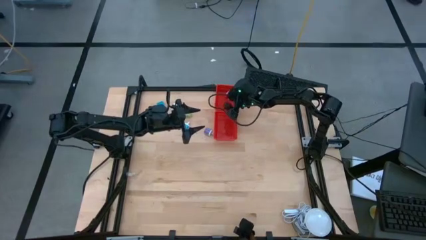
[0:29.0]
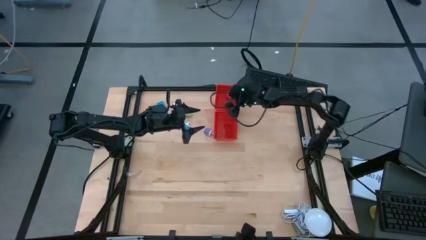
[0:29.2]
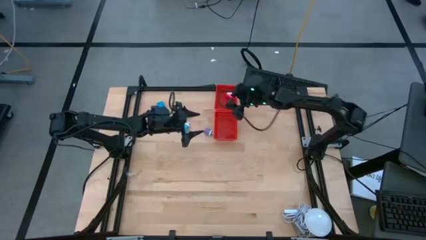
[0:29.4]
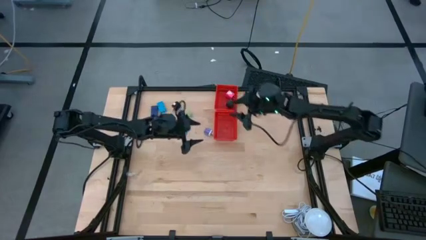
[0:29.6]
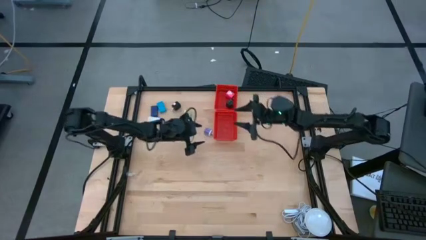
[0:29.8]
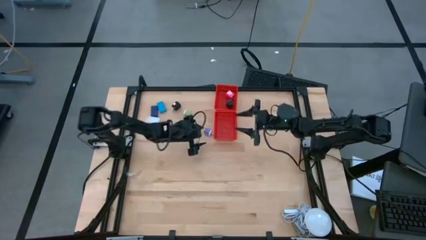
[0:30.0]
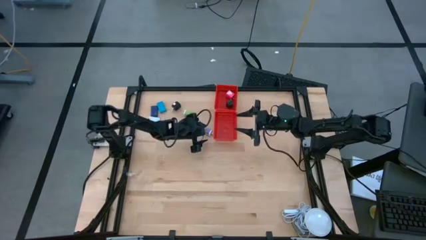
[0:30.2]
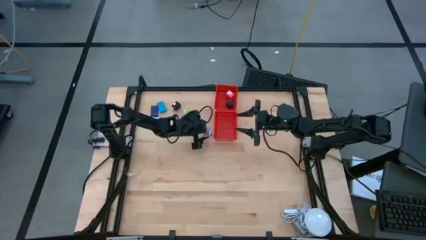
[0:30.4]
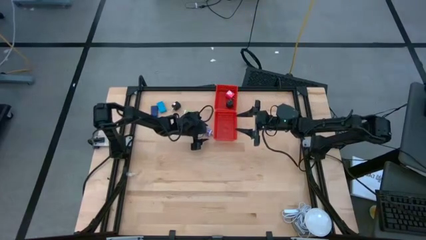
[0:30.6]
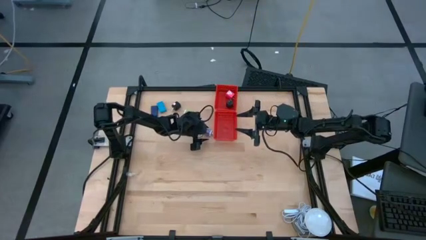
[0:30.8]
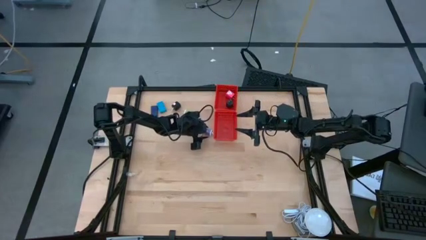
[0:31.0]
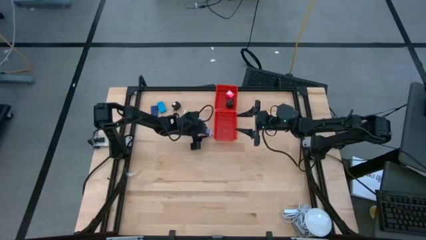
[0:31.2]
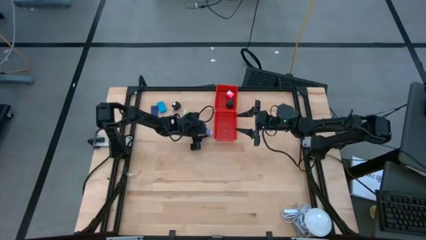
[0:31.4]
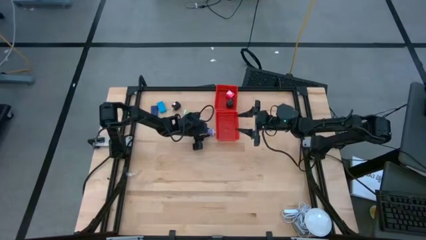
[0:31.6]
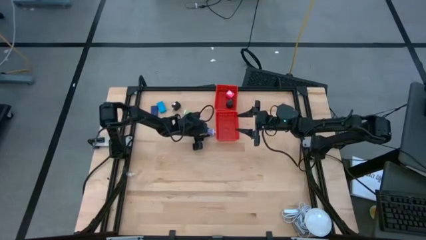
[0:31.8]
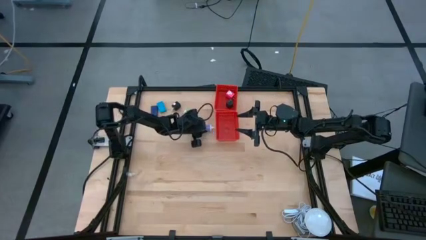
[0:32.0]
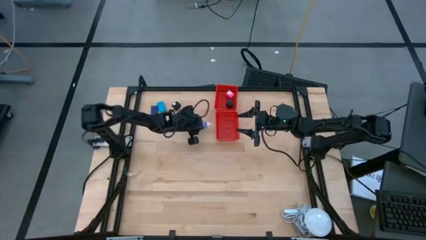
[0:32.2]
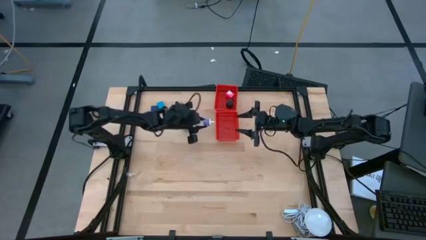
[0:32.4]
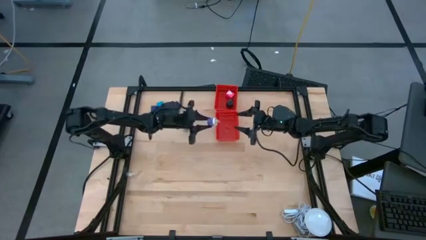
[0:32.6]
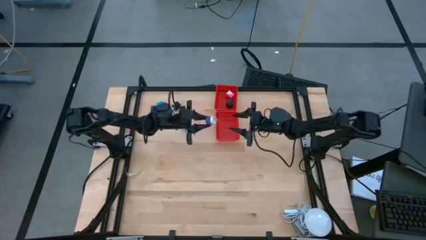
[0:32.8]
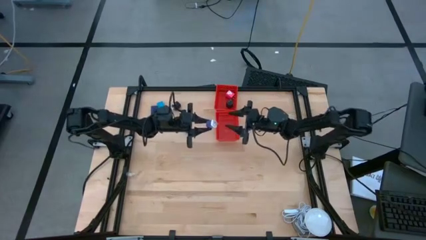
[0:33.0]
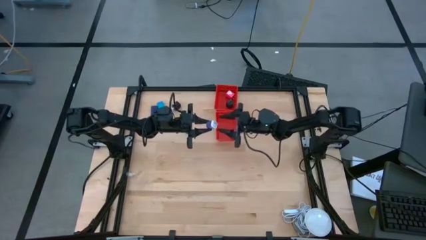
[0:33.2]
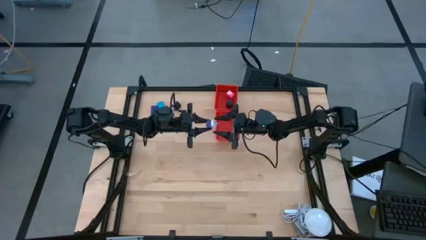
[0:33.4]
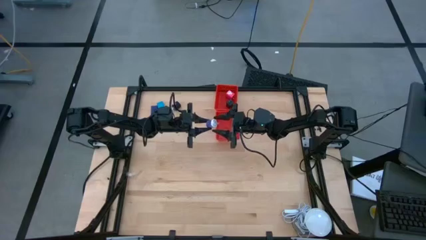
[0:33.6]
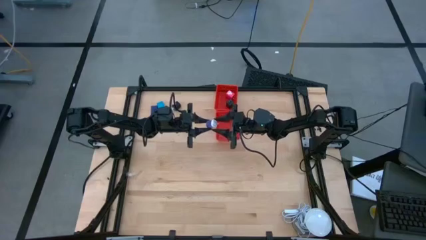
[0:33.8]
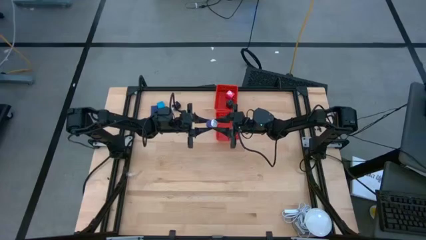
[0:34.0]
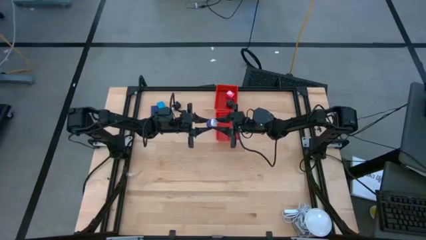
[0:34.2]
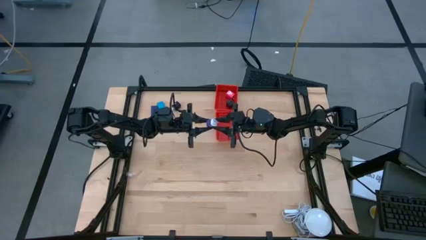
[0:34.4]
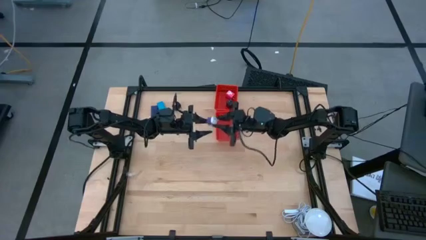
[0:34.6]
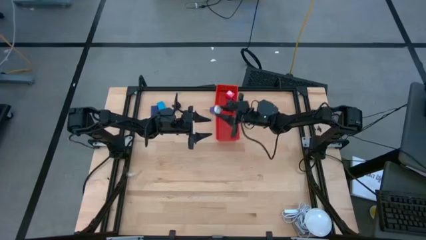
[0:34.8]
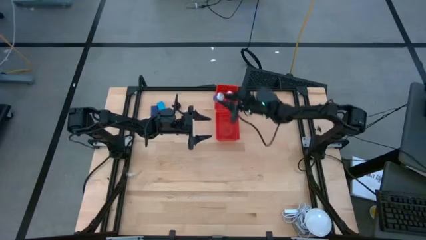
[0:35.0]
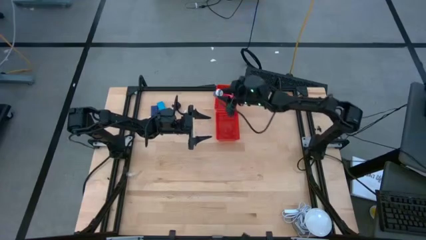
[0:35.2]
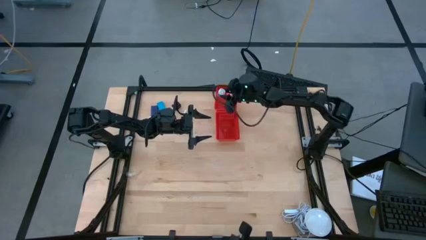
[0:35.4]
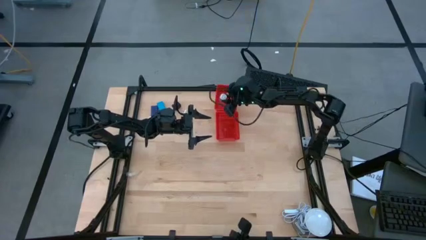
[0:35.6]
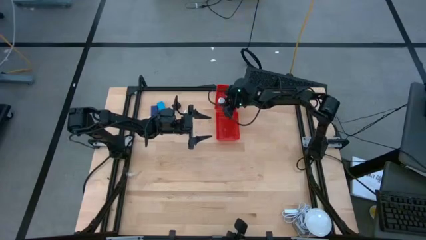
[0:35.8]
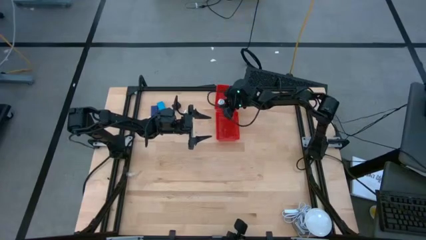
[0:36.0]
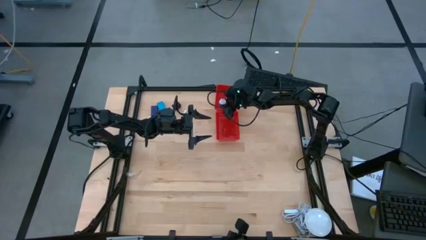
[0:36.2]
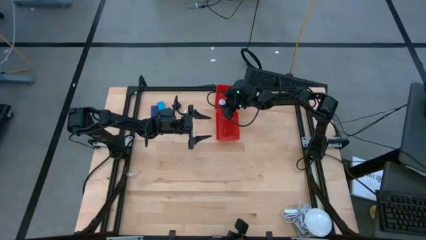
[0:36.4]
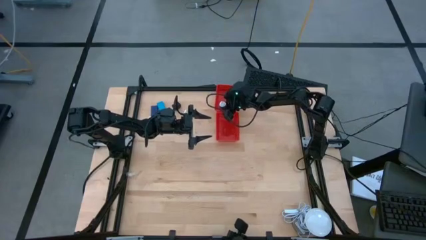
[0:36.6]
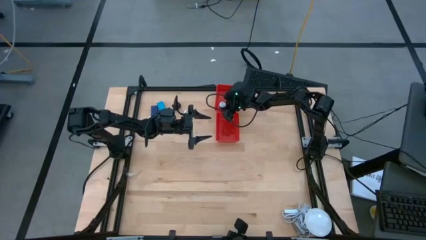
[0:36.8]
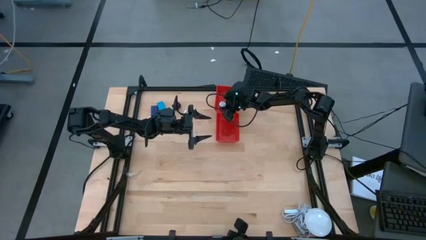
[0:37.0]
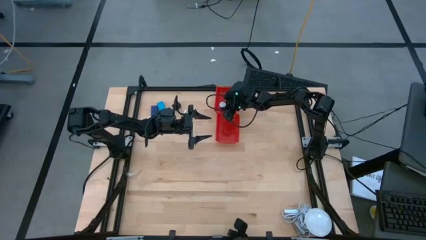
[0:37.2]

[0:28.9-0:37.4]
Task: Pick & Place Office items
Put the violet charger adapter into the top red basket

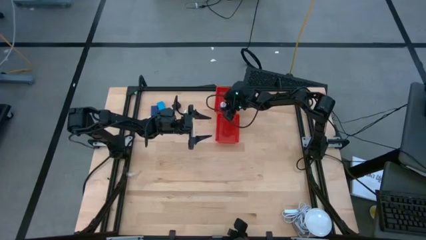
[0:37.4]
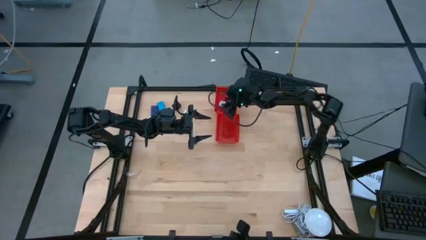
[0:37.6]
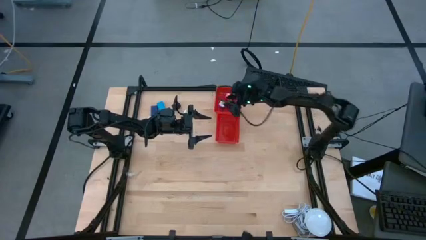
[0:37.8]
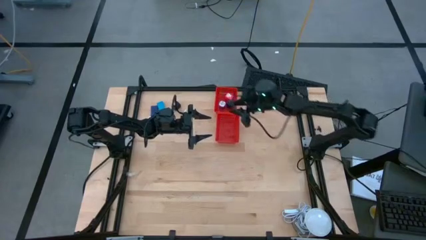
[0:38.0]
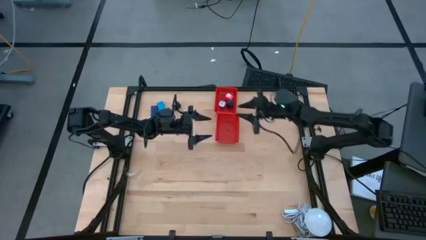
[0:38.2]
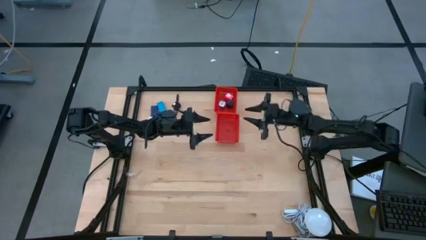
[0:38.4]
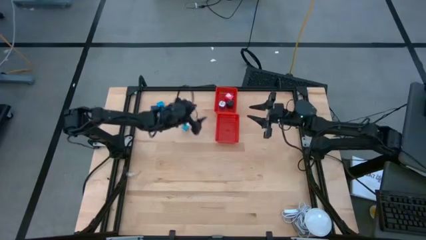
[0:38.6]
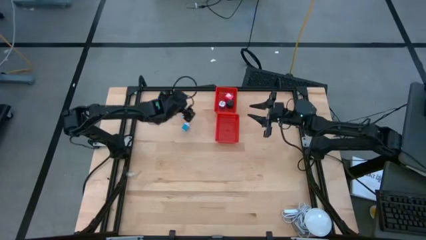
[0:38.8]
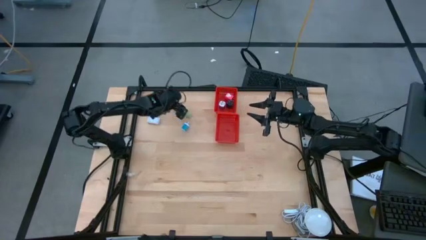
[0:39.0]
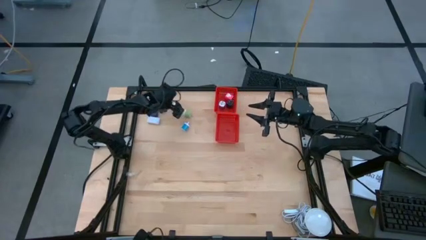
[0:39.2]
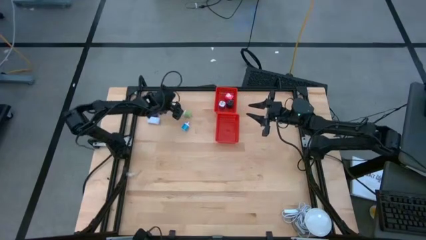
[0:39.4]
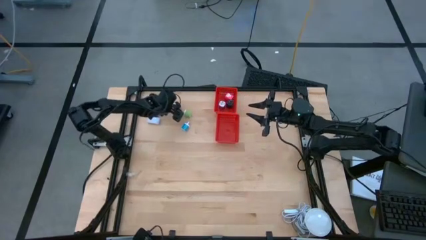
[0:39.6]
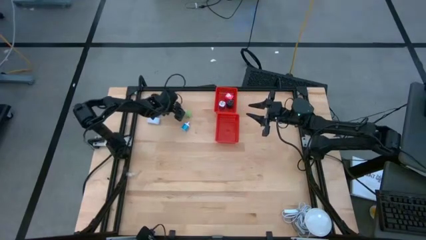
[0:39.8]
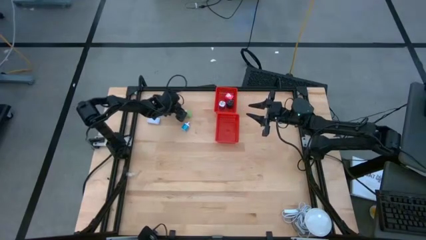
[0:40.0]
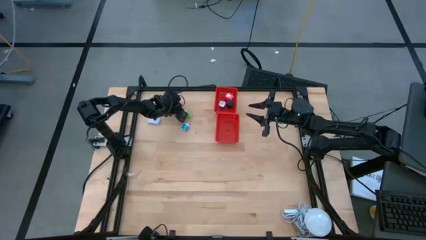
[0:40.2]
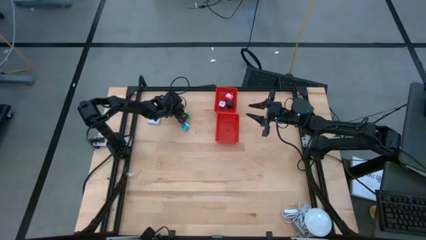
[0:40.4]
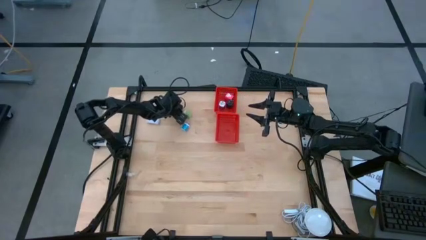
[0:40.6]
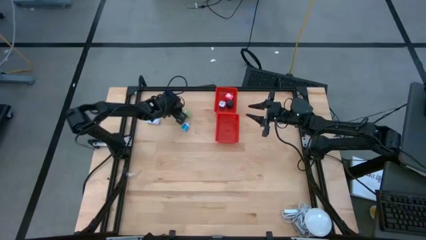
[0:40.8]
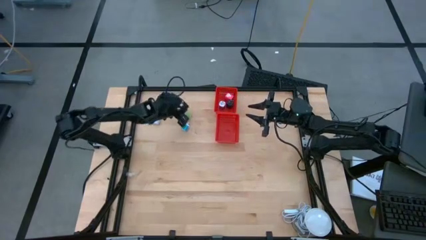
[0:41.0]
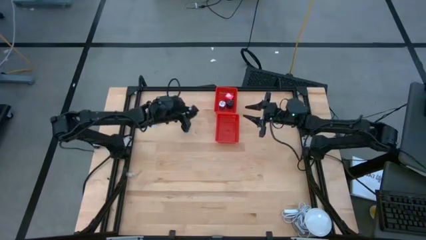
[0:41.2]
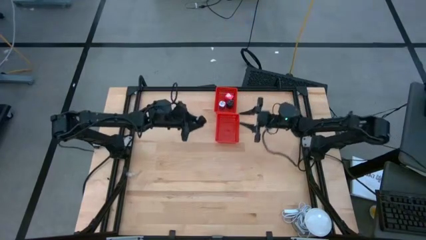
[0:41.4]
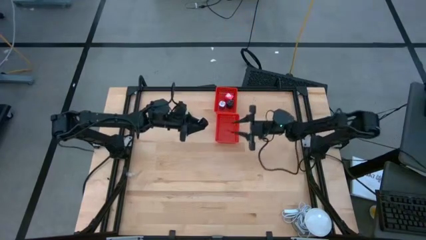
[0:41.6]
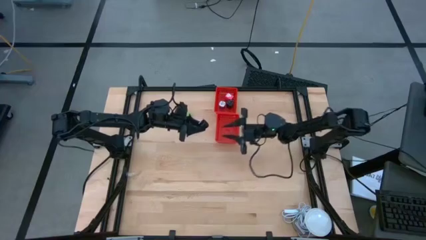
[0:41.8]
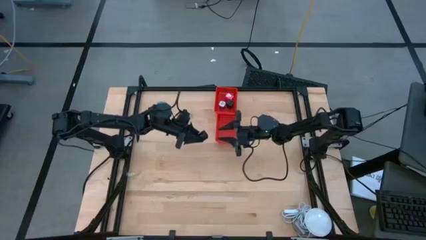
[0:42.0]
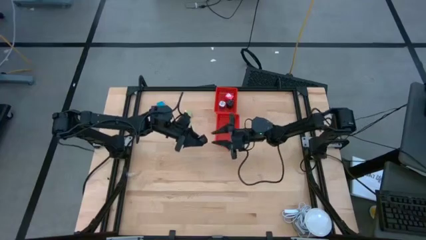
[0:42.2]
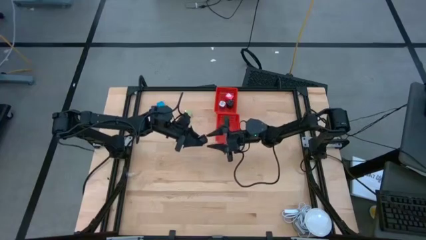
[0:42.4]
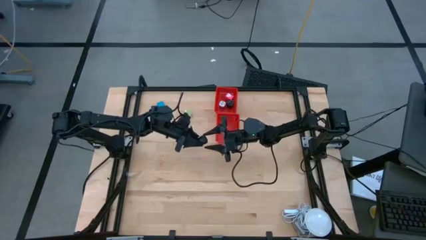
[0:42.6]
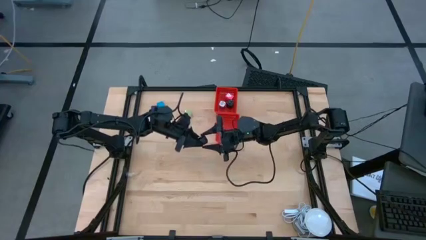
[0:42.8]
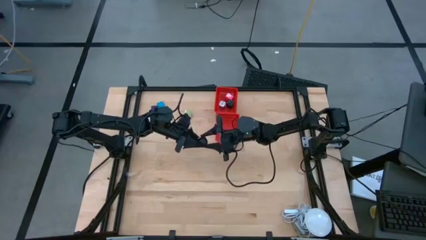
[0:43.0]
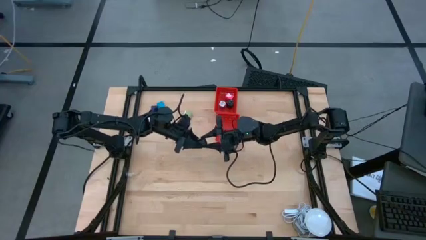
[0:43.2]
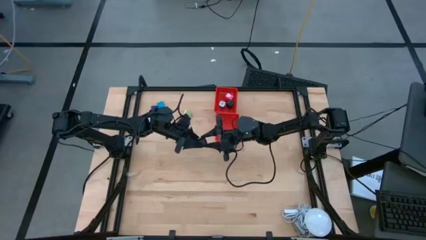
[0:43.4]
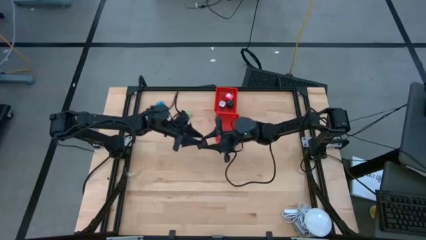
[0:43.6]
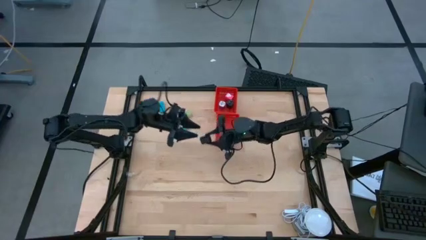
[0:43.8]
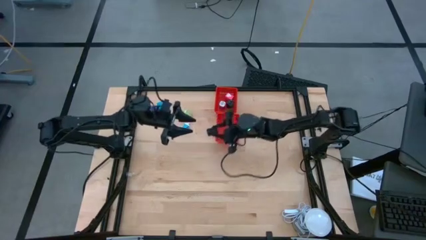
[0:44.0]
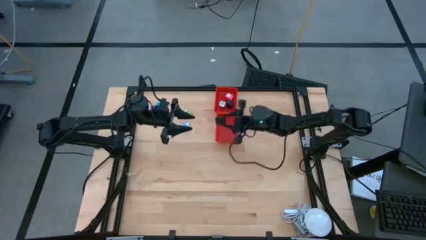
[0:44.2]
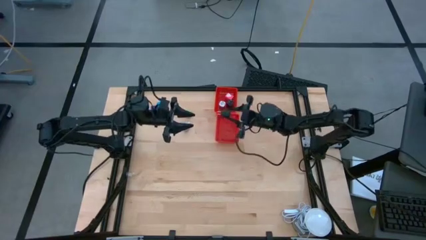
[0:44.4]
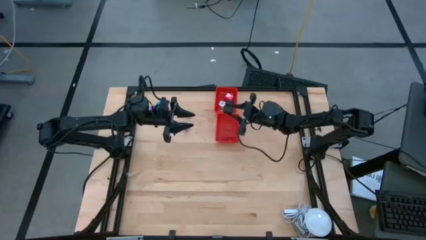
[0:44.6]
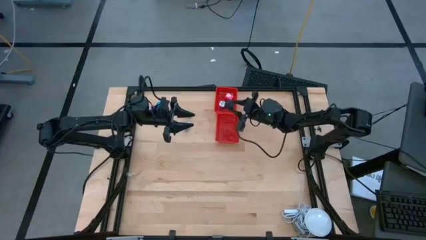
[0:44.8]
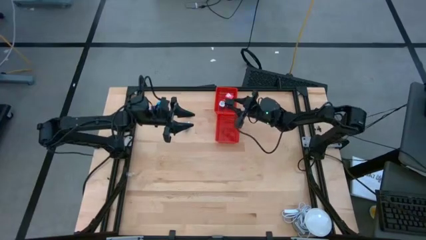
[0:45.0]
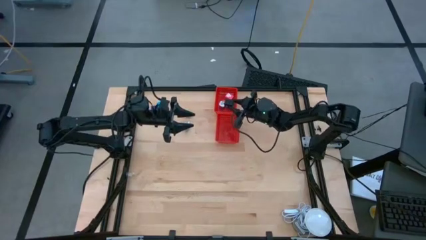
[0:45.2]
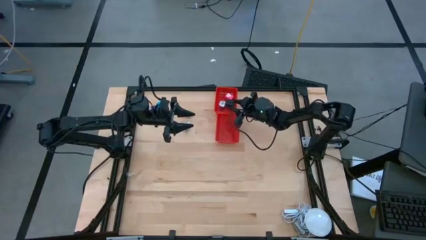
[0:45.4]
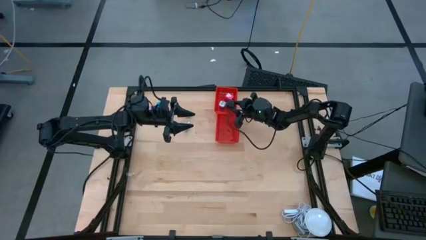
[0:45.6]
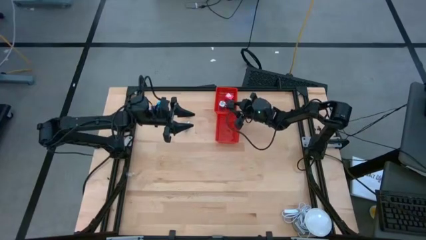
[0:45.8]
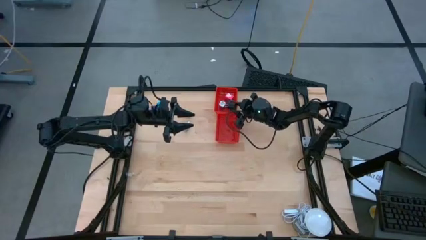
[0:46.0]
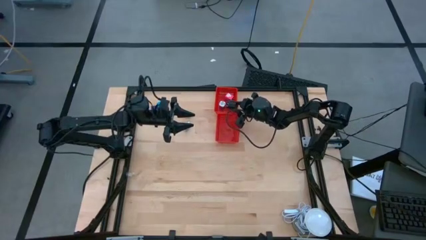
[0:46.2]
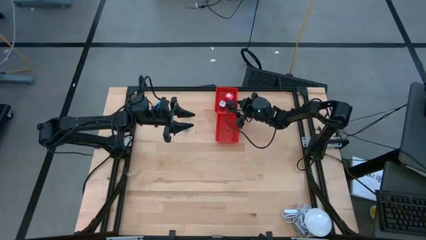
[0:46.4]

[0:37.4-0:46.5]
Put the black charger adapter into the top red basket
